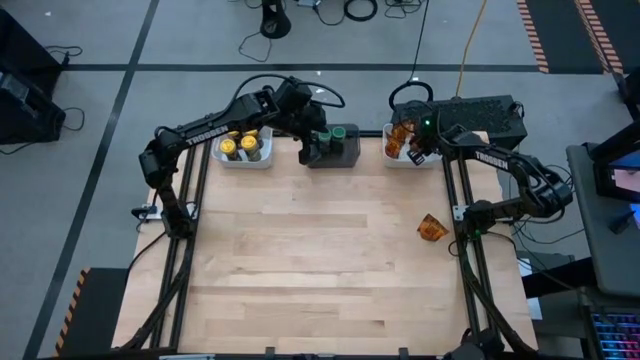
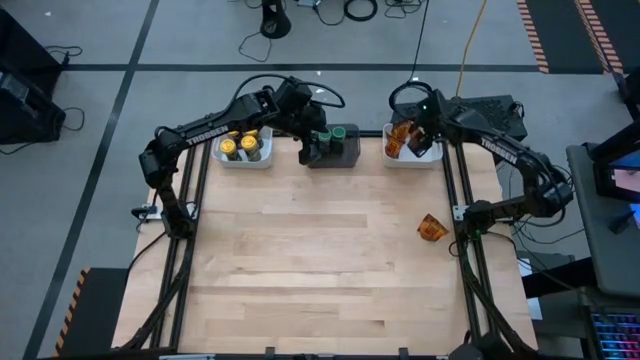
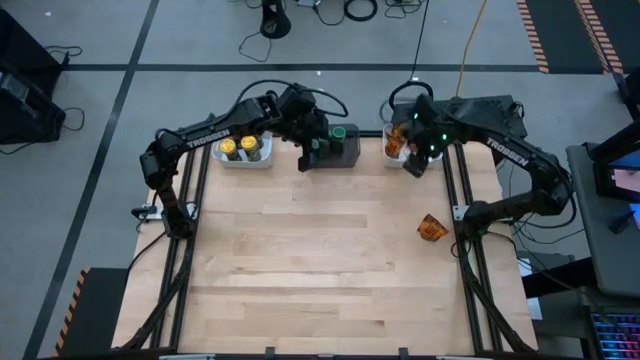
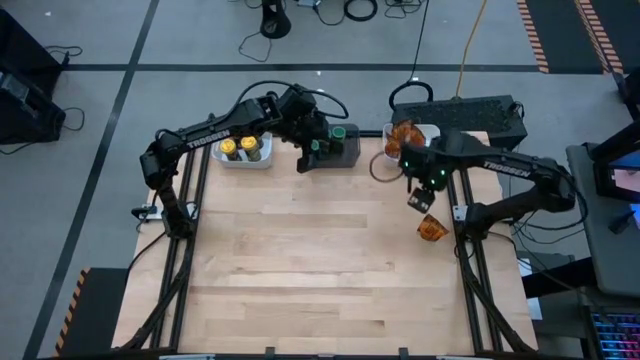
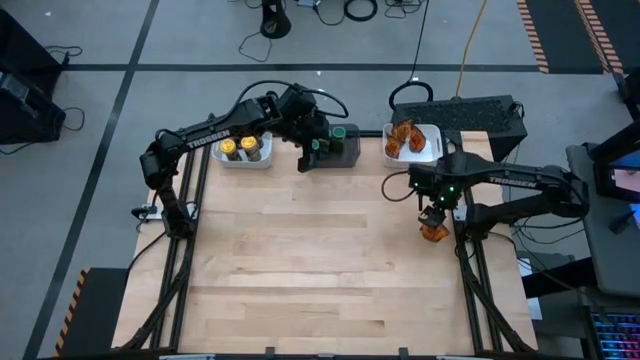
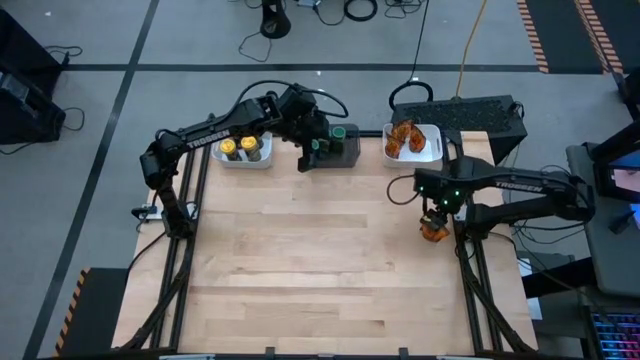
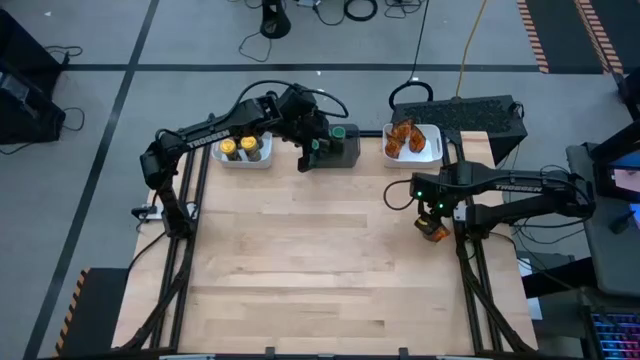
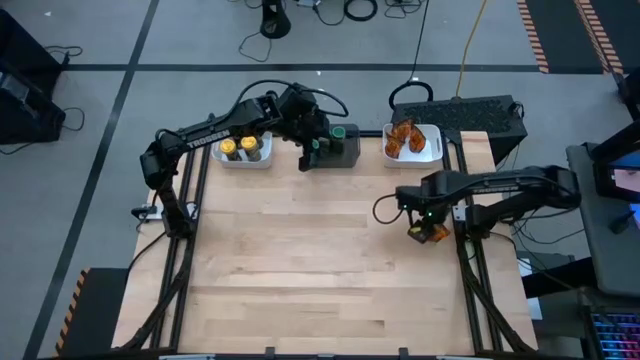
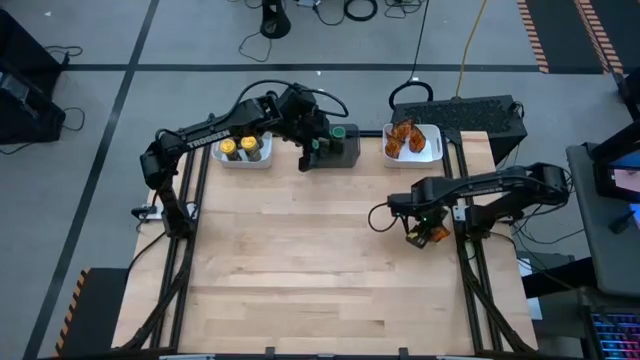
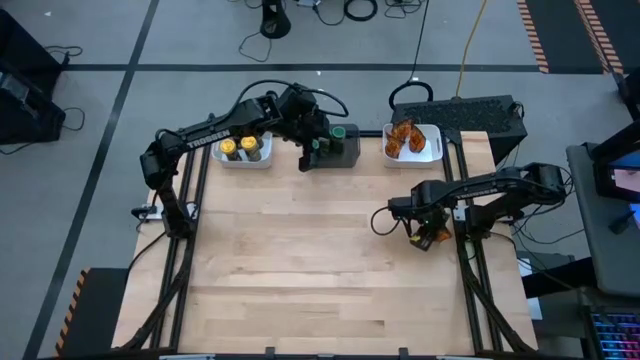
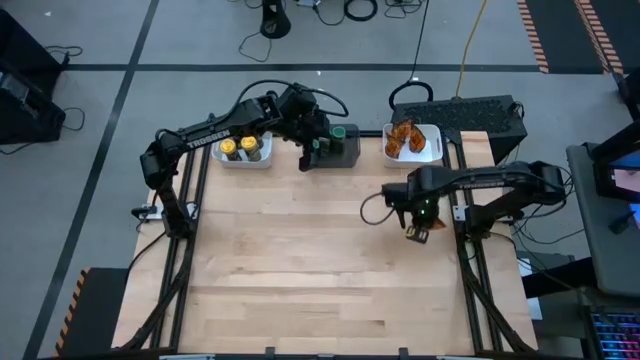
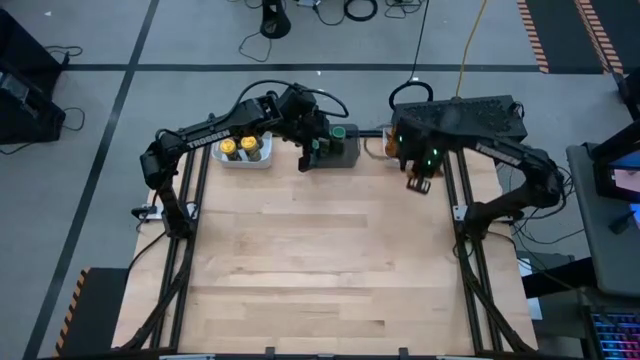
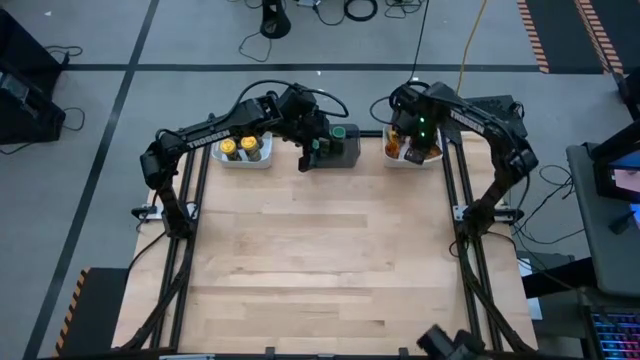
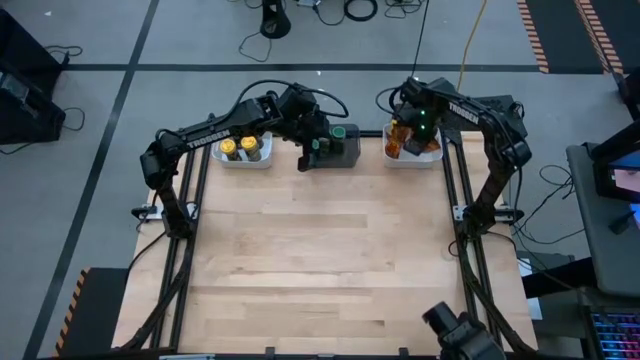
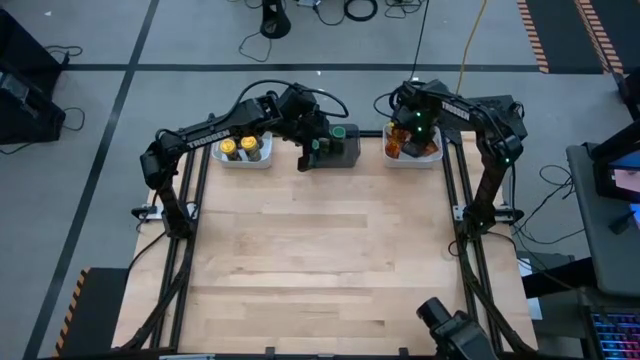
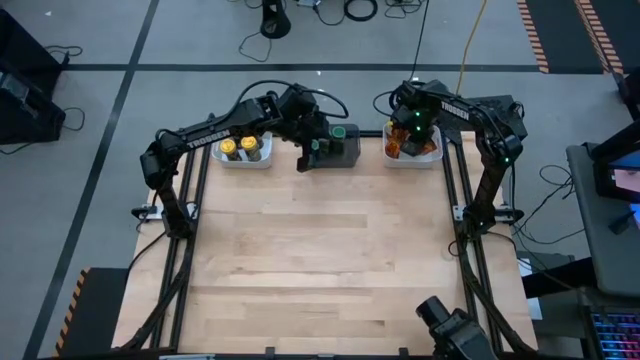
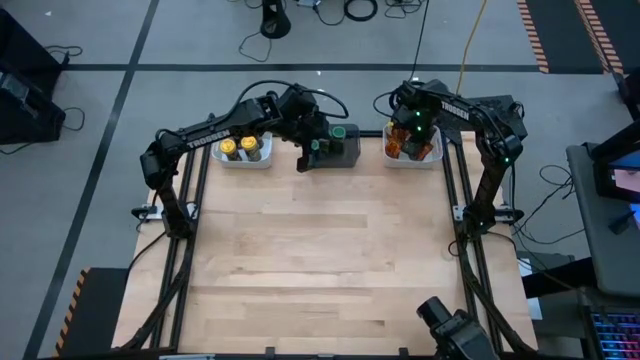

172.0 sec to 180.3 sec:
Task: Sort spices by type
Put the orange seasoning pack into the right white bin

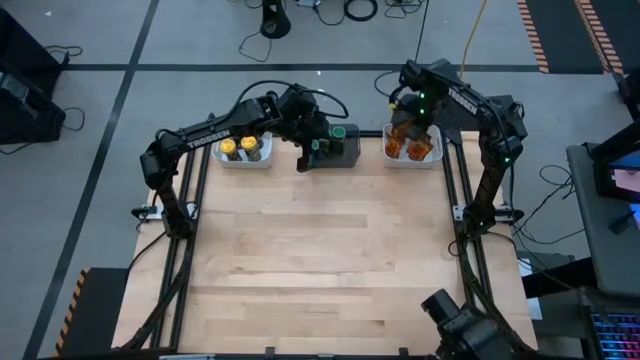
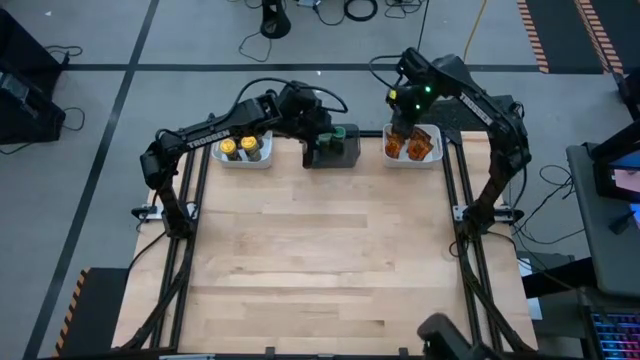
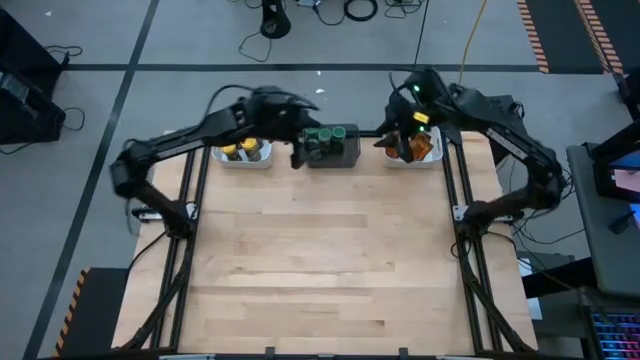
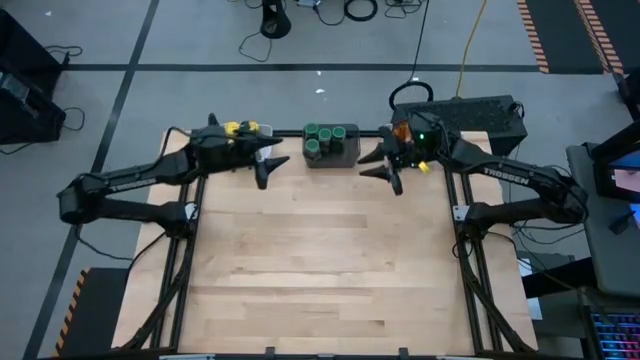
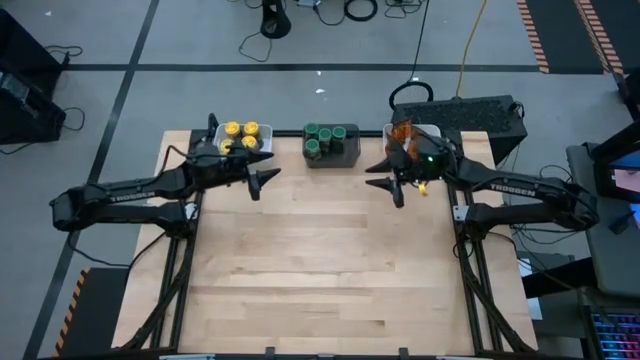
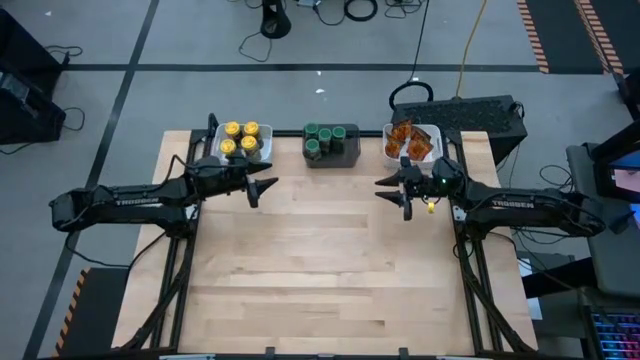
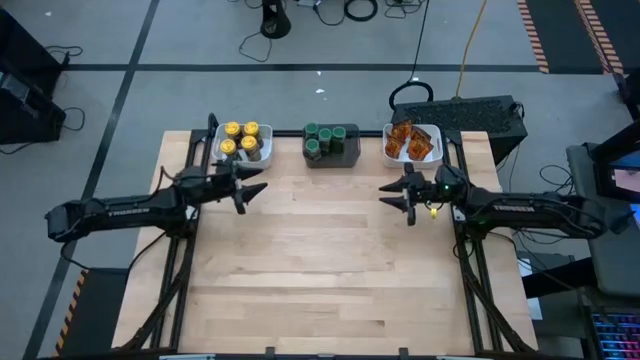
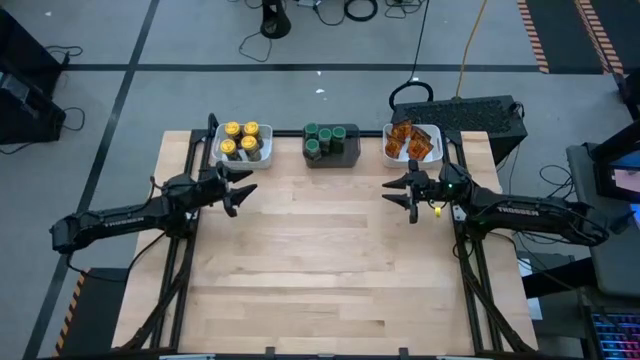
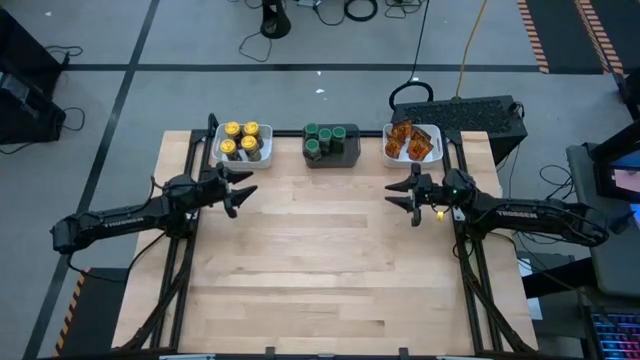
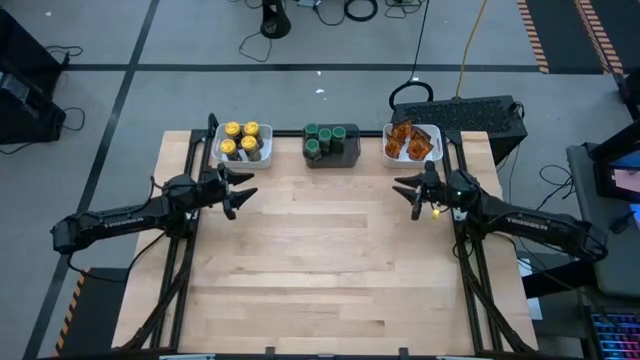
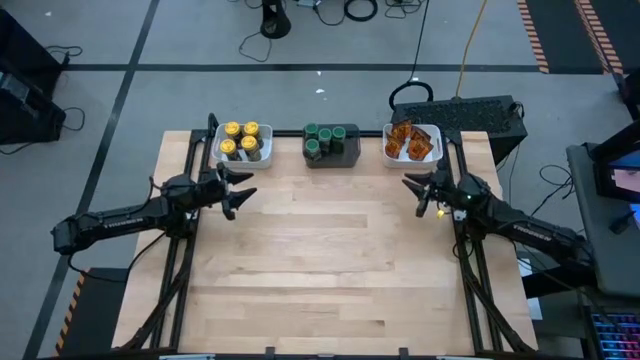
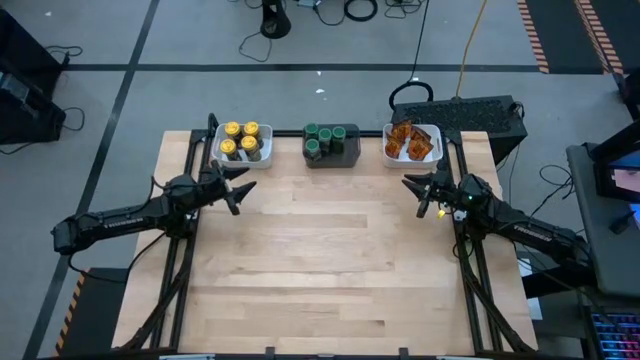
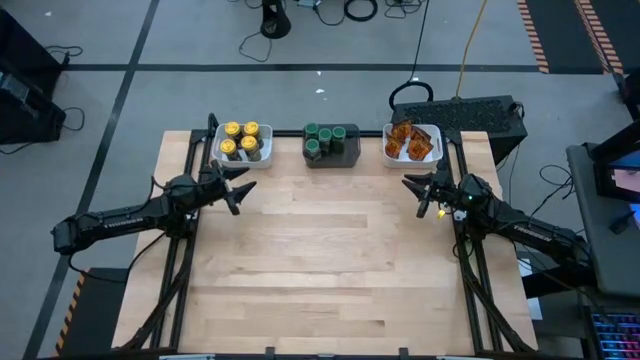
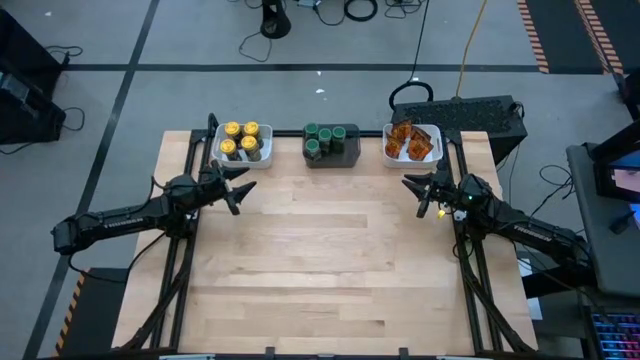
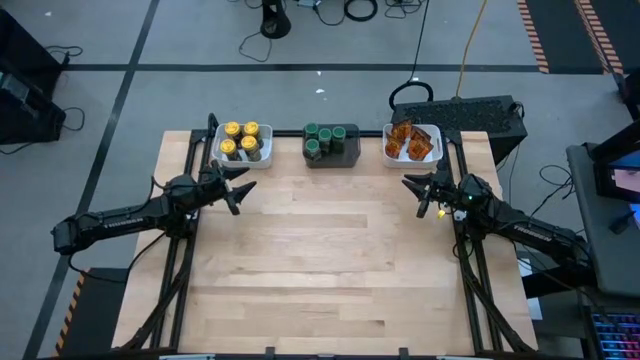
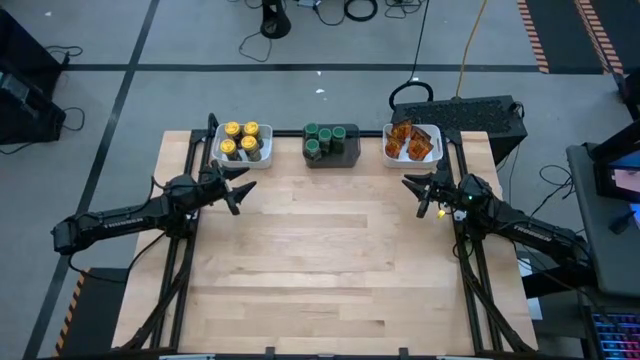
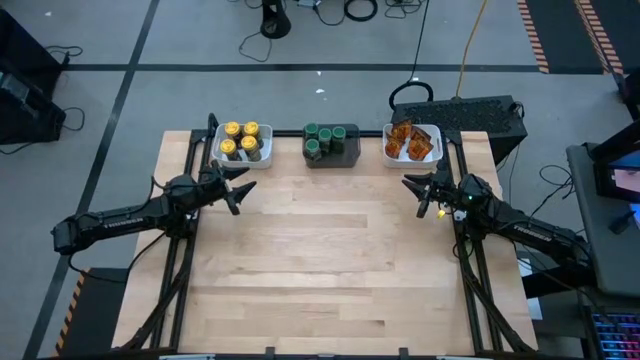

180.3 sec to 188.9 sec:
Return to Home Position

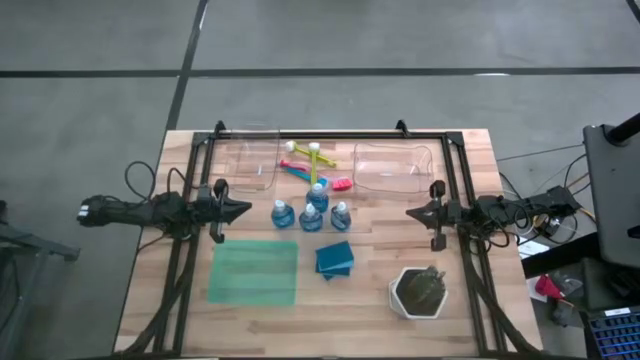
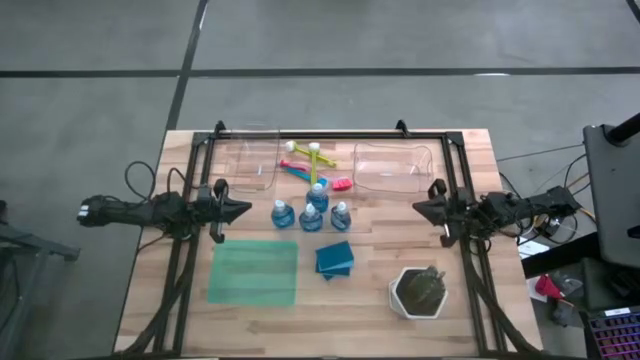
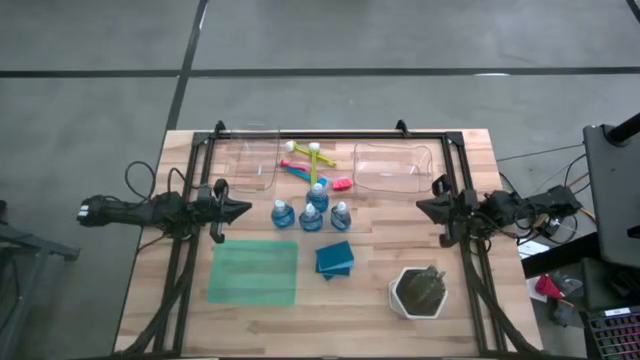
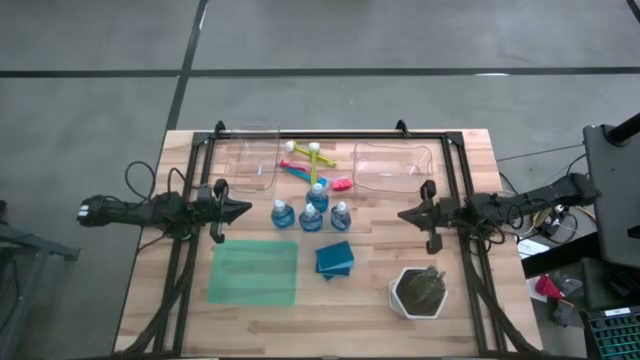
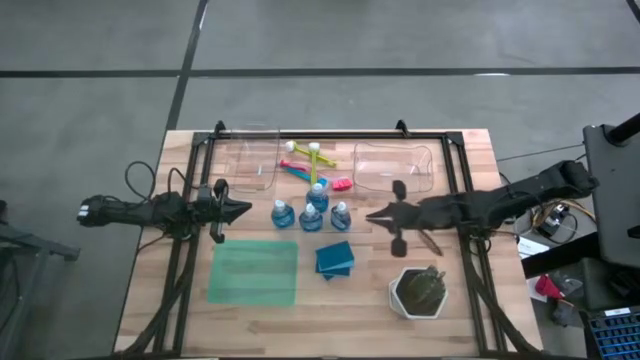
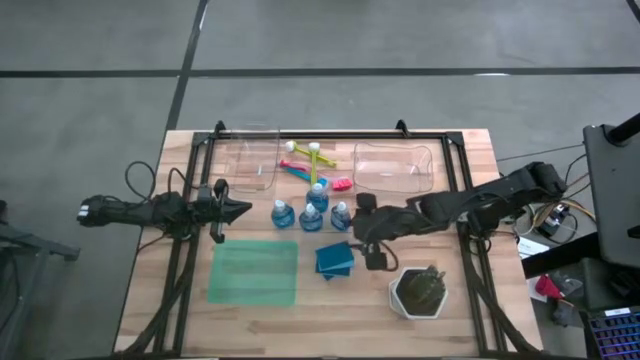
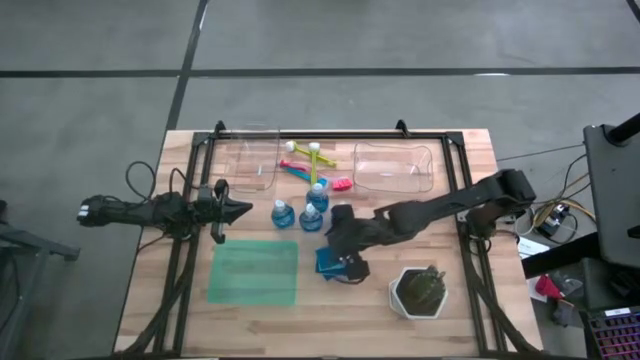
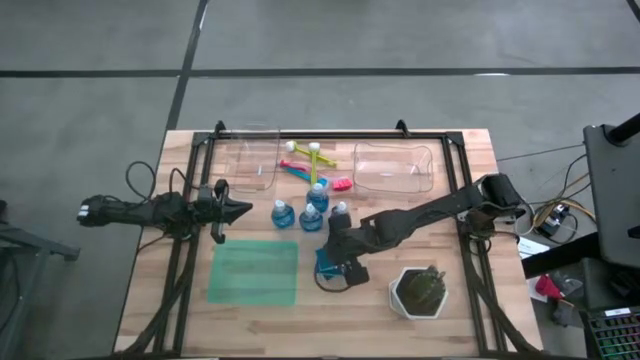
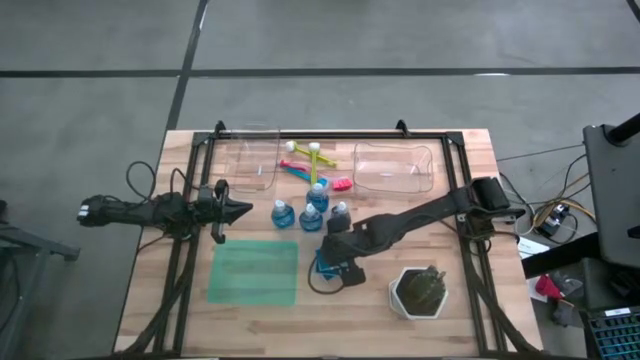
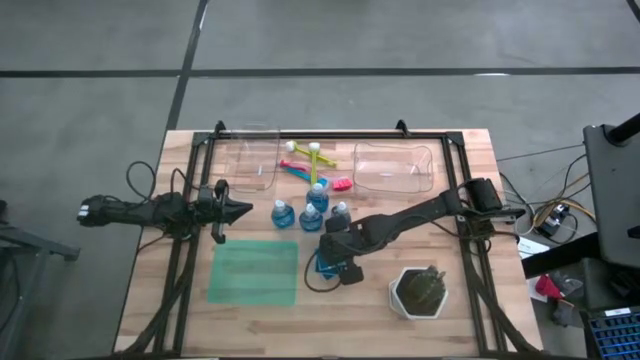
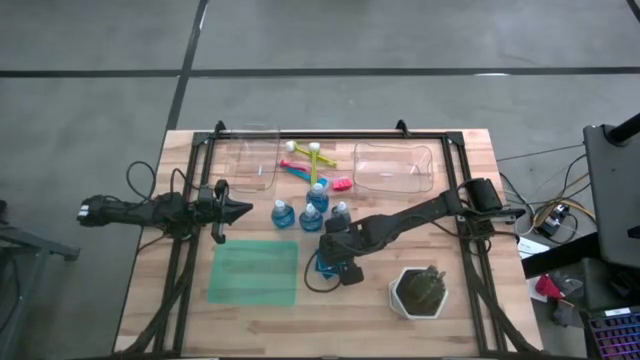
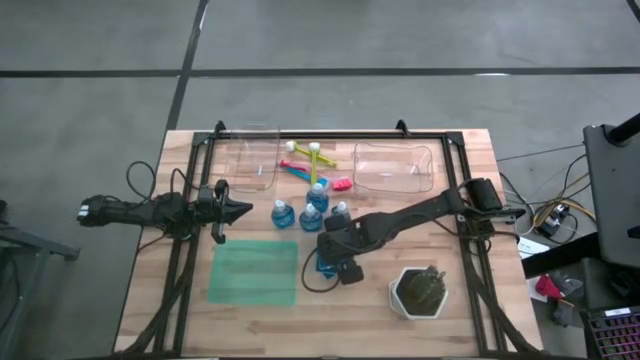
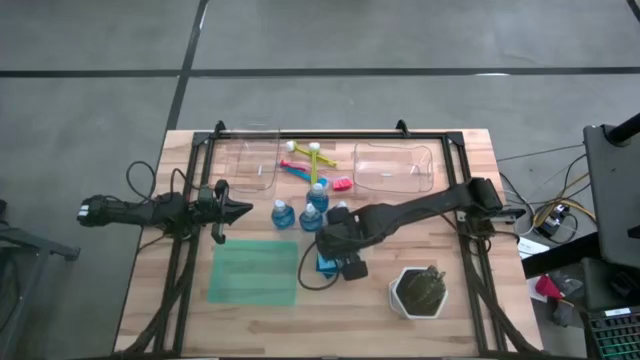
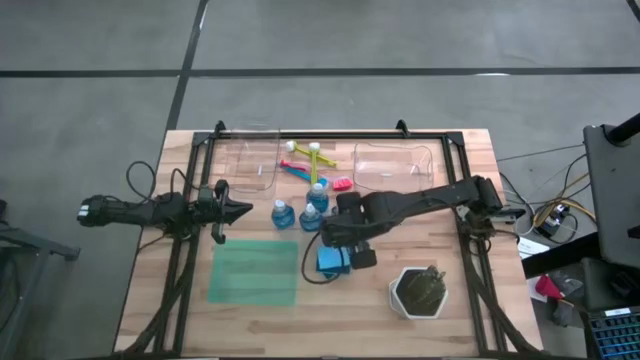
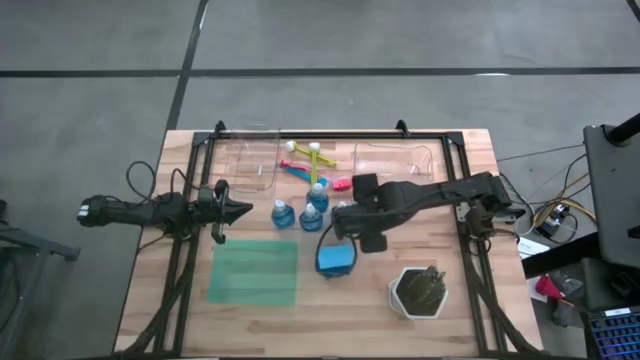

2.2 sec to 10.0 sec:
Task: Pick & Place Kitchen Sink Supplies
Put the blue sponge into the right transparent bin
